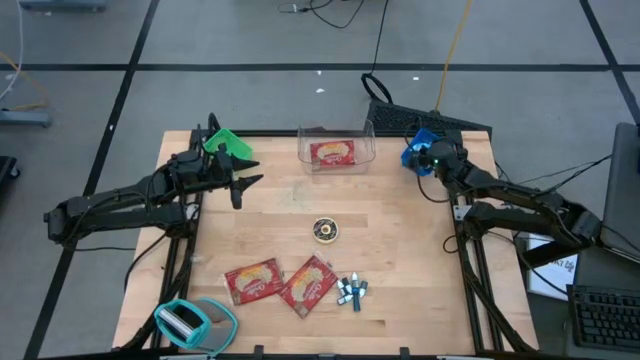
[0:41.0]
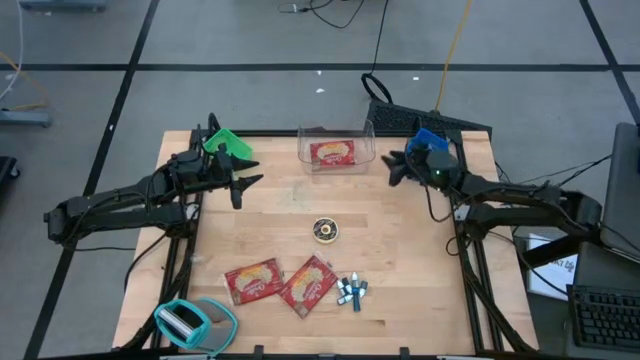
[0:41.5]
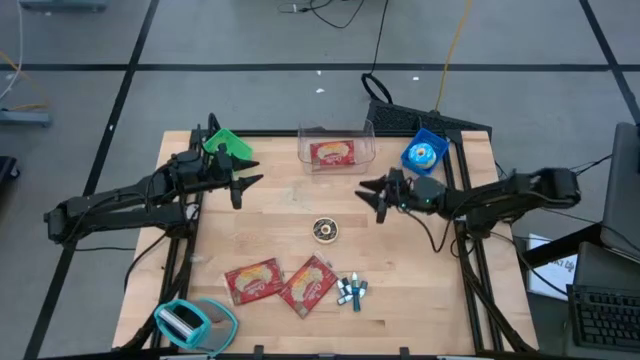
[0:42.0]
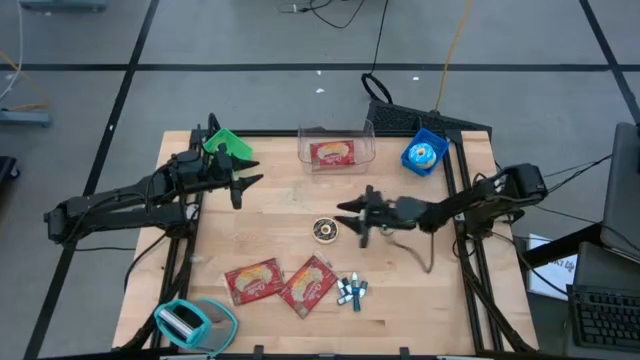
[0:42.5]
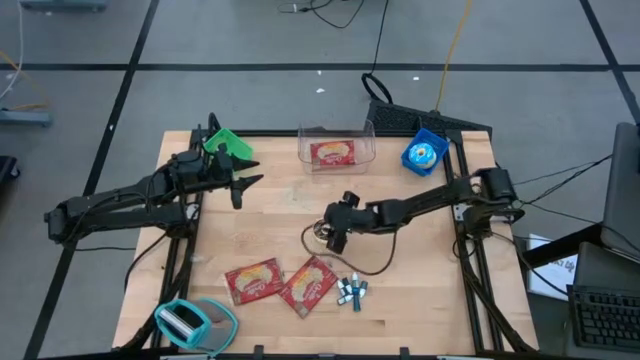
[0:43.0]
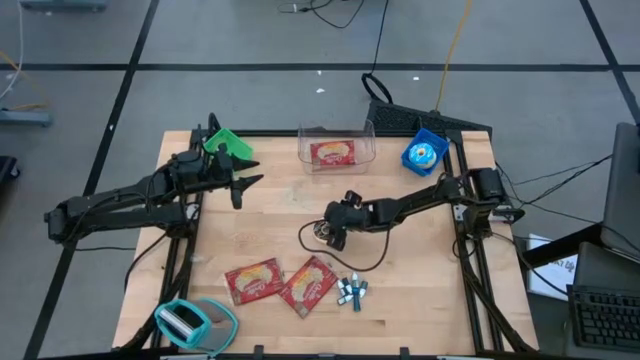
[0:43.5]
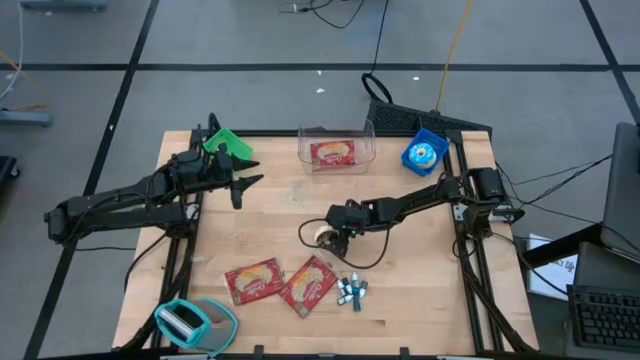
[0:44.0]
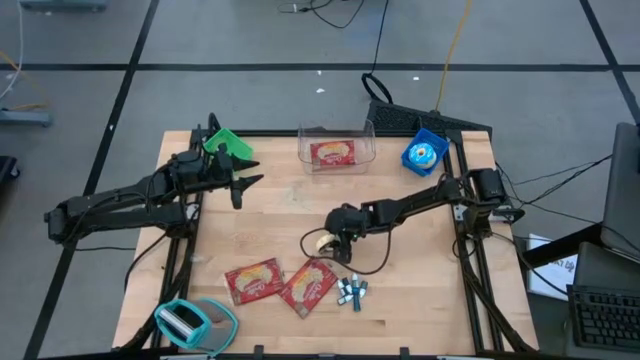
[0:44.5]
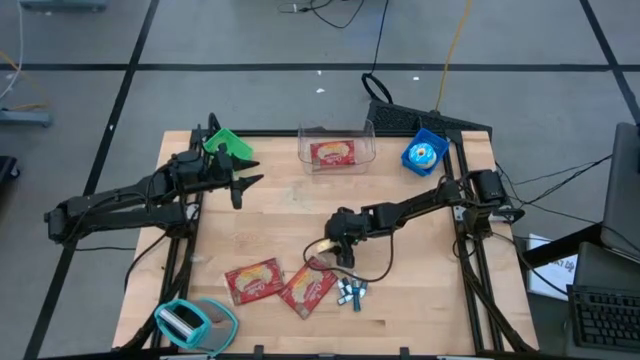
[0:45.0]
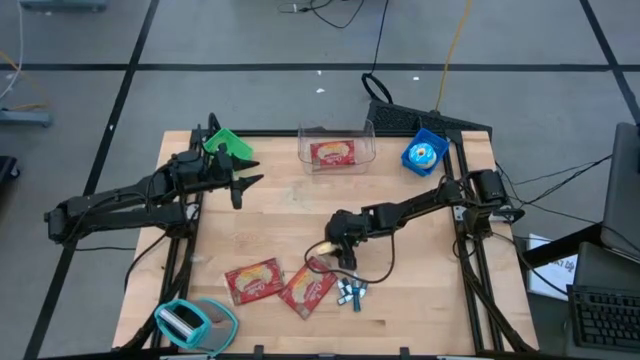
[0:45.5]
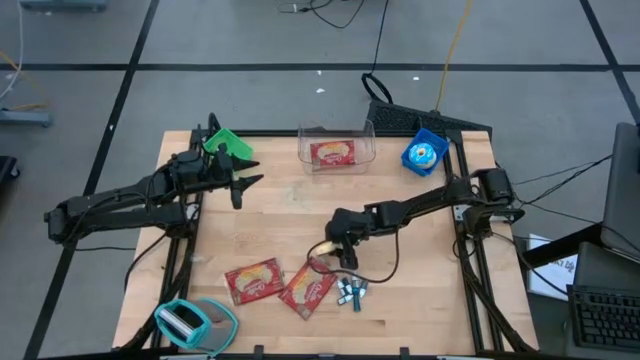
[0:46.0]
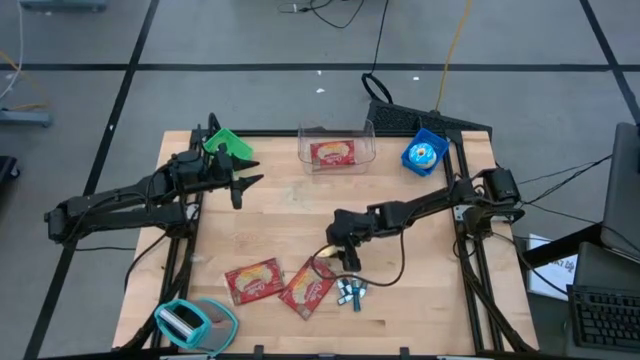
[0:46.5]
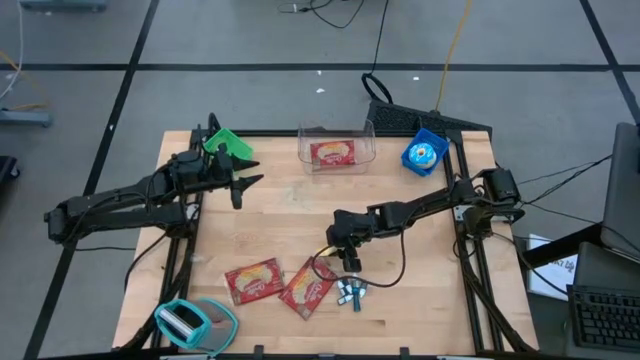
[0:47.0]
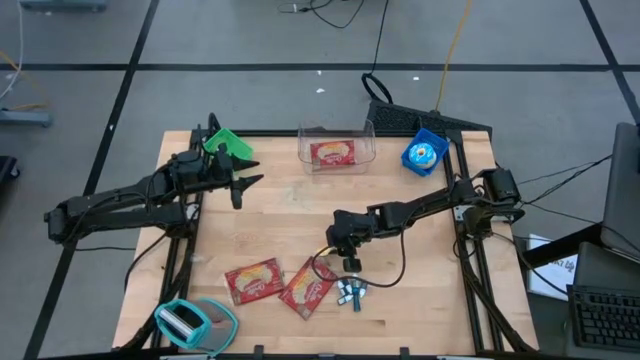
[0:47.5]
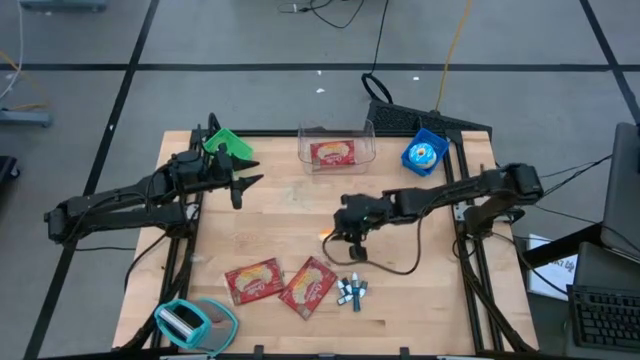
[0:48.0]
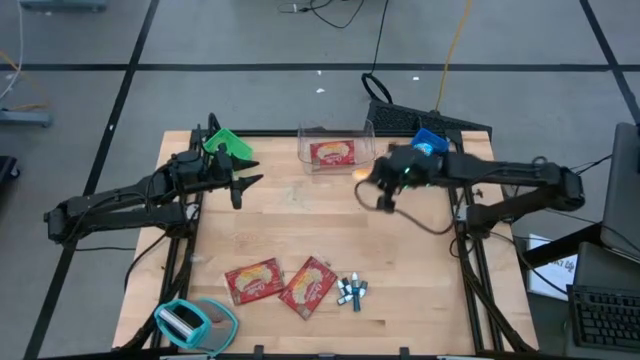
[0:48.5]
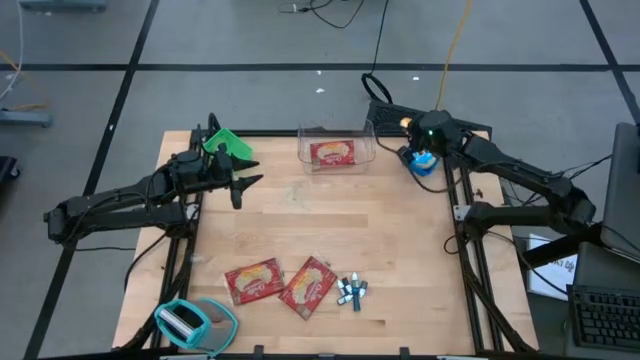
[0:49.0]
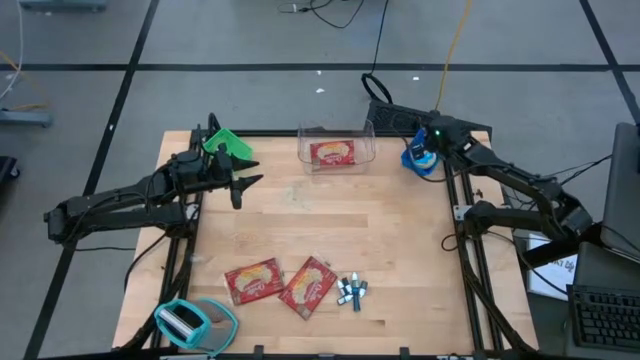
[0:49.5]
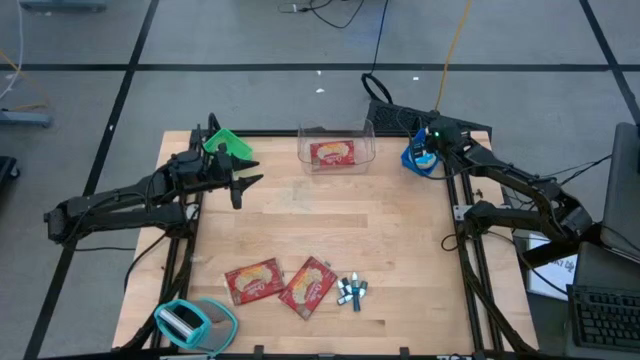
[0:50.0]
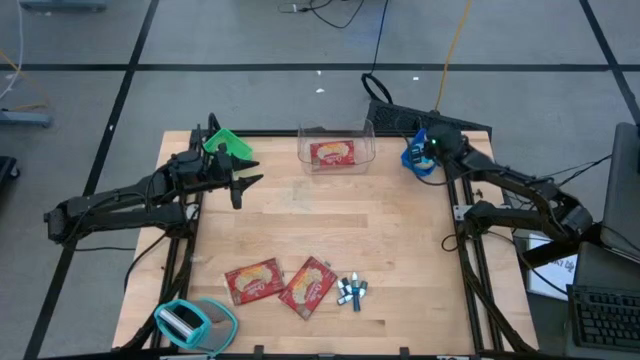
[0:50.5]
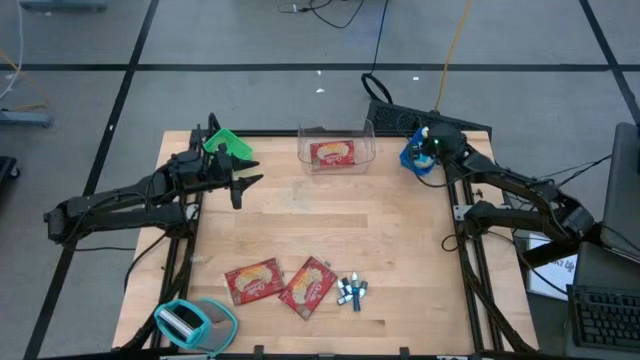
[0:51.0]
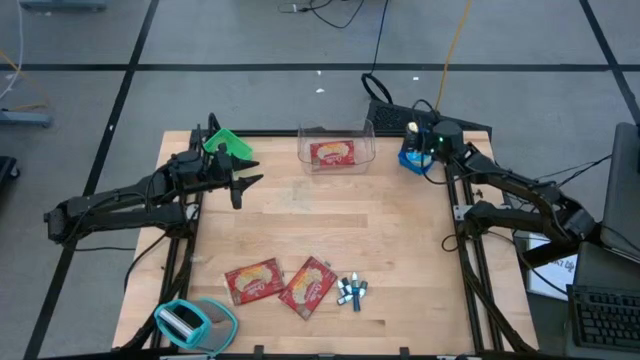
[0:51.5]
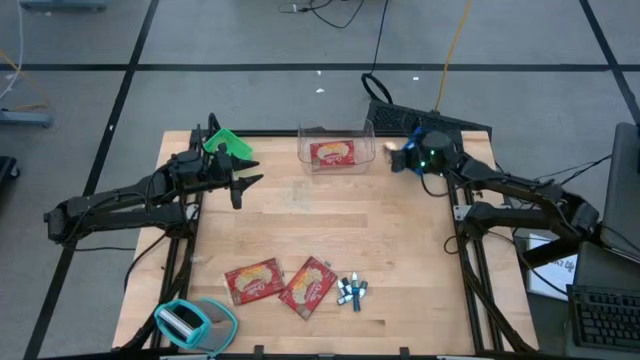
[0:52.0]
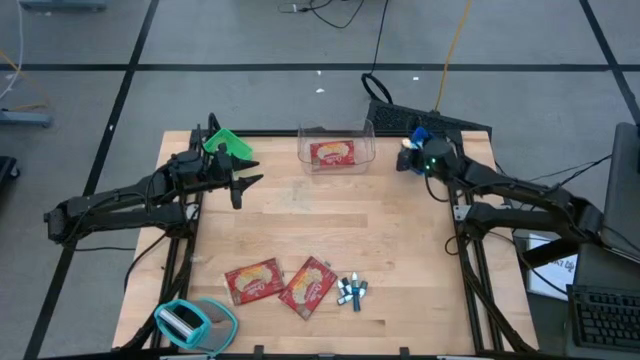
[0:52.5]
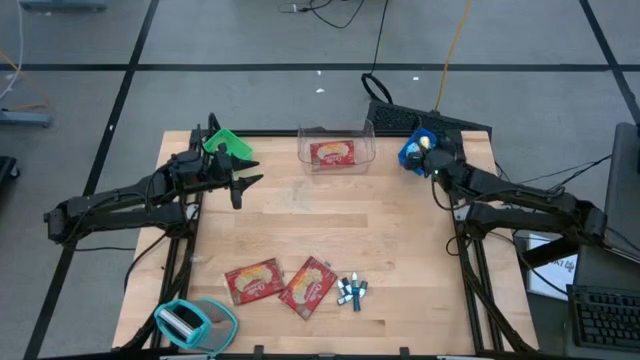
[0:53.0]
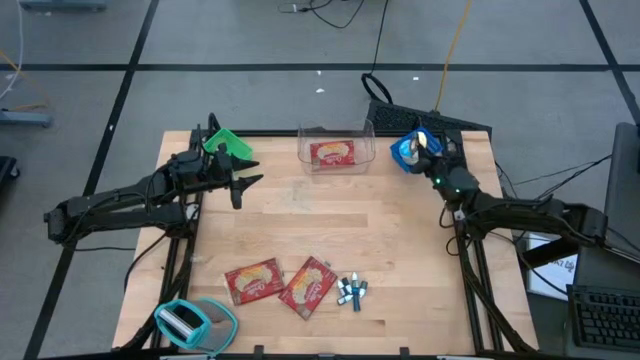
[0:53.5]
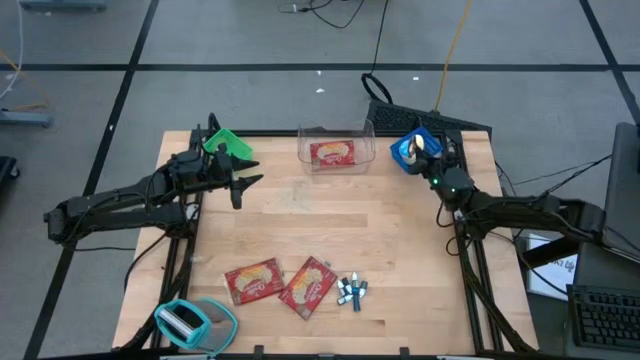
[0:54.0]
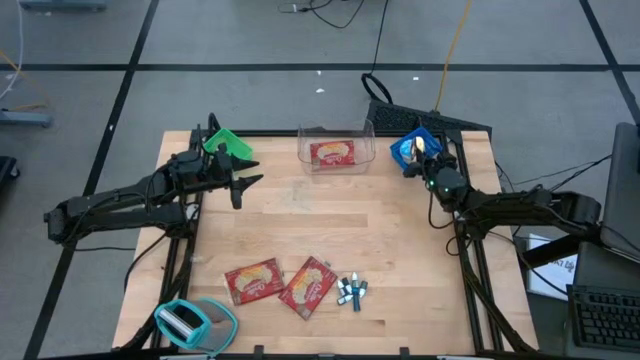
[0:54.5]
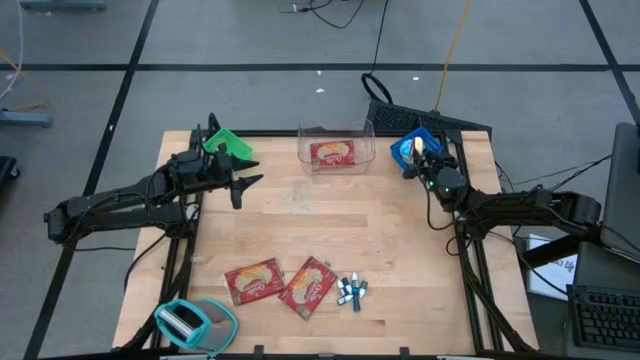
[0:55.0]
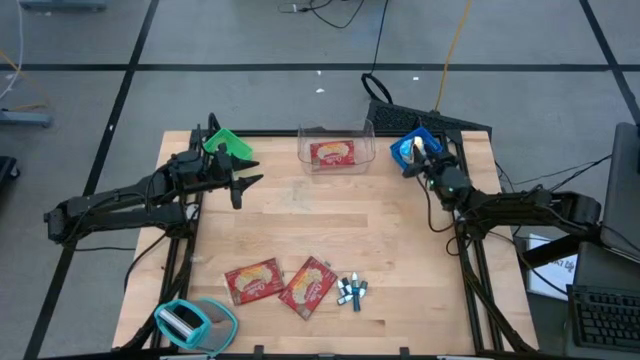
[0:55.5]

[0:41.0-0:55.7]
Put the black donut into the blue bin

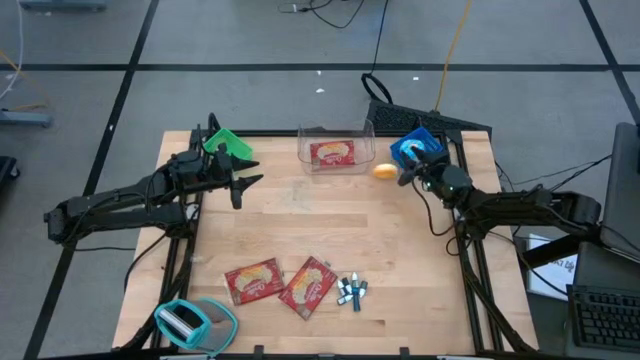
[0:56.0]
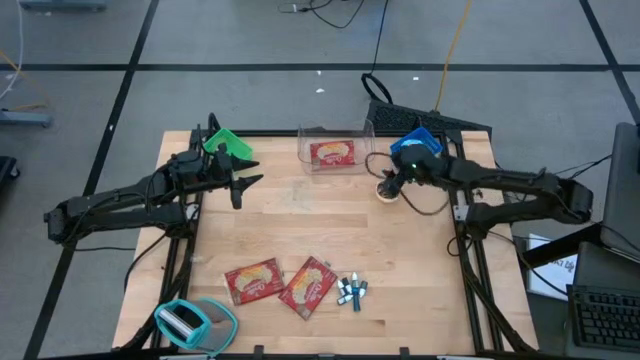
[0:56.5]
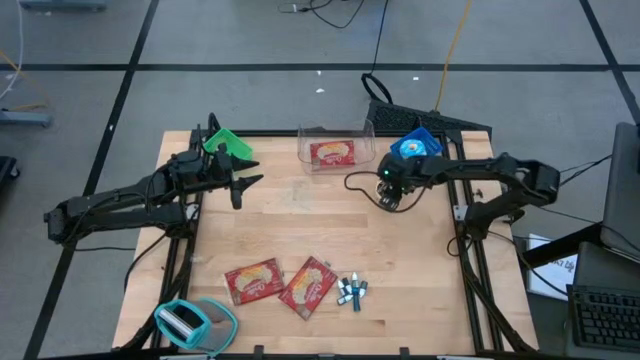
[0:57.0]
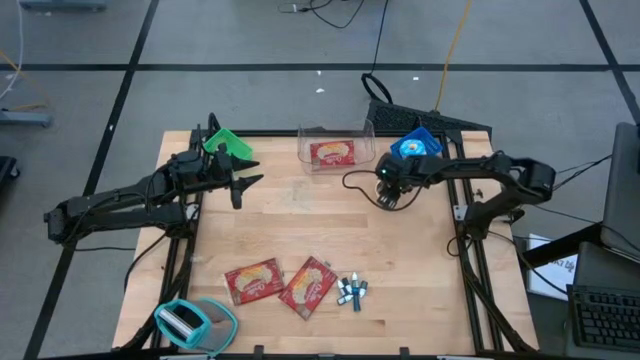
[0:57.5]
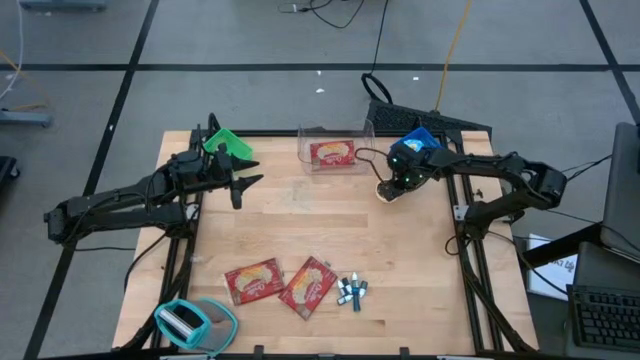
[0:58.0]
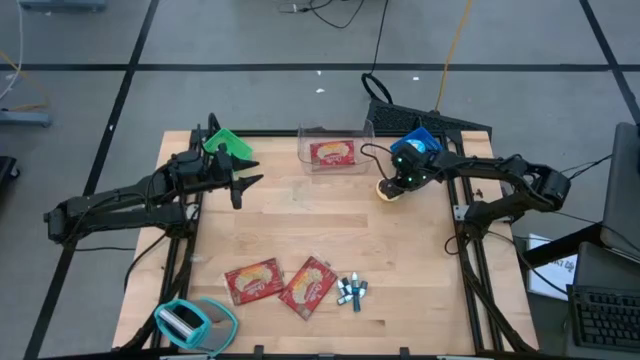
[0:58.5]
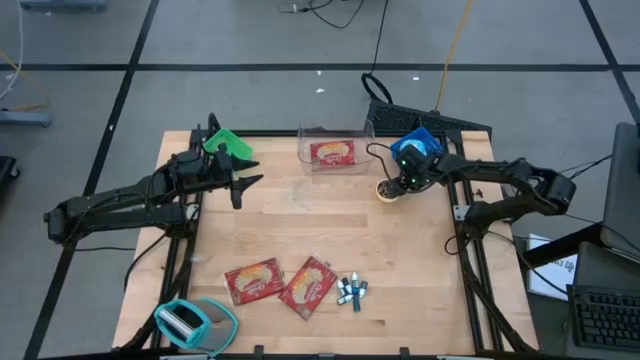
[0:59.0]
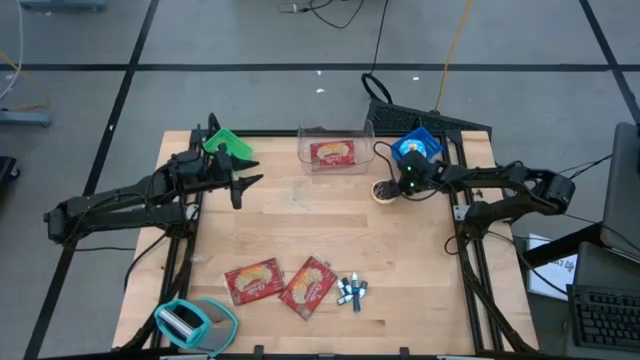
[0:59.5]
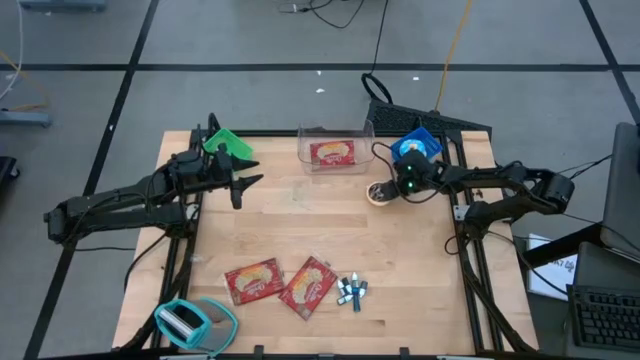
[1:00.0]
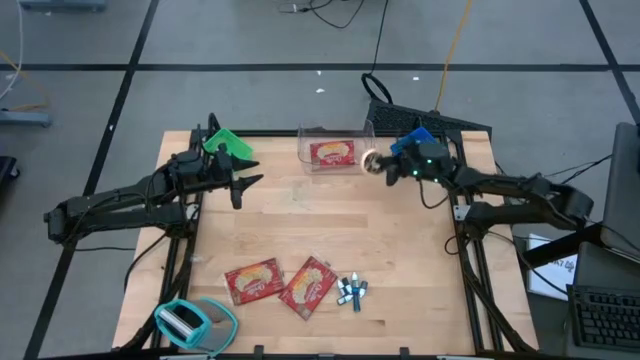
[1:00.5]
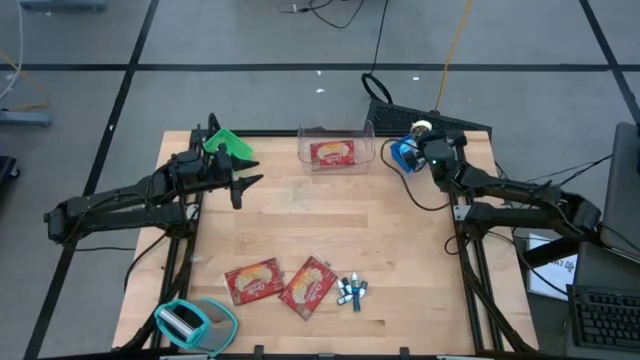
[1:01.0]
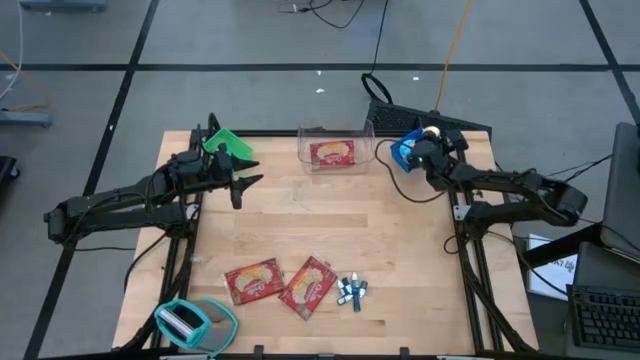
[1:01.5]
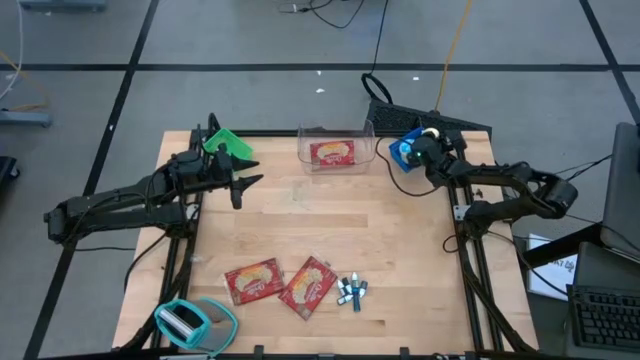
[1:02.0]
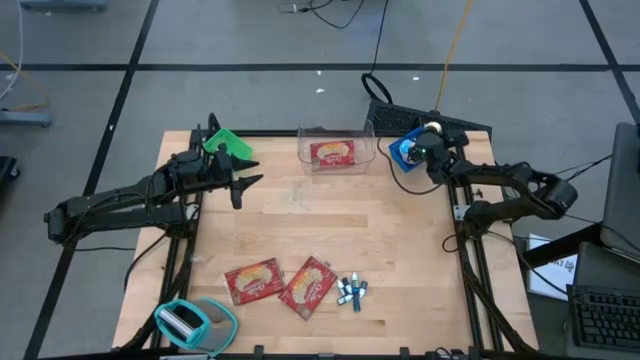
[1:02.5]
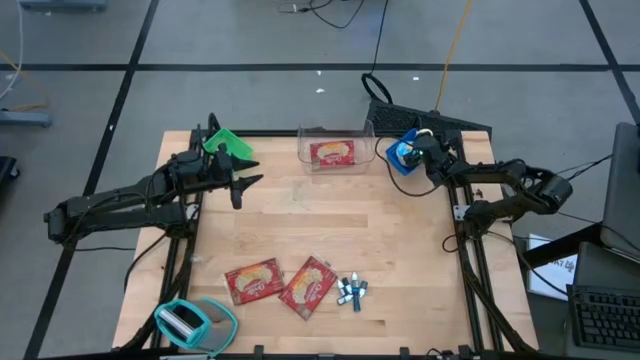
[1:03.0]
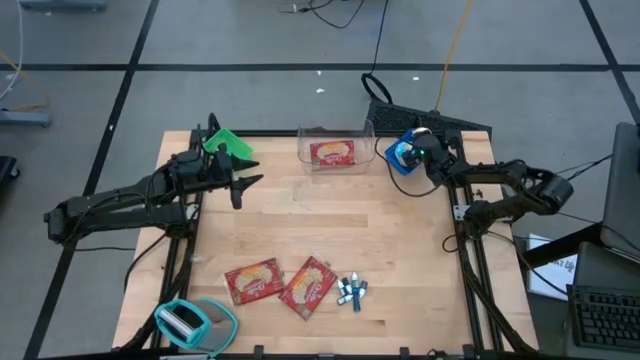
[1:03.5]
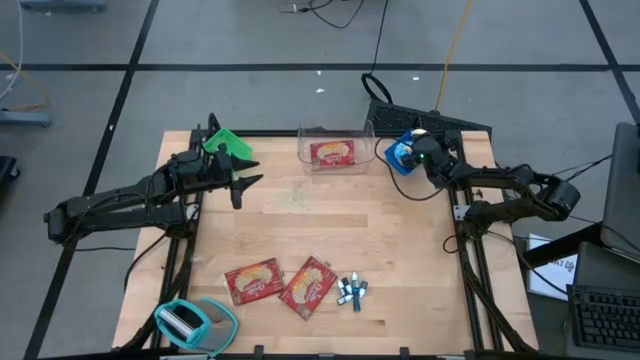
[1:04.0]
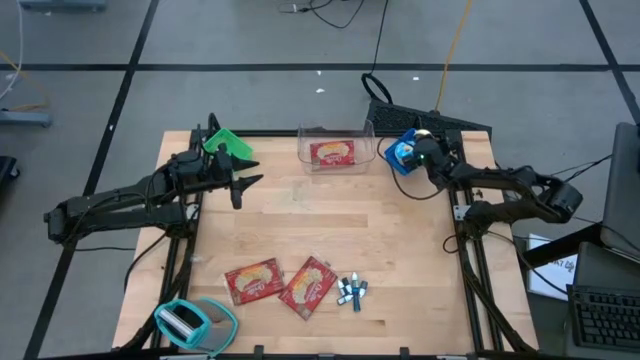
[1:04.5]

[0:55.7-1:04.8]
Put the black donut into the blue bin
